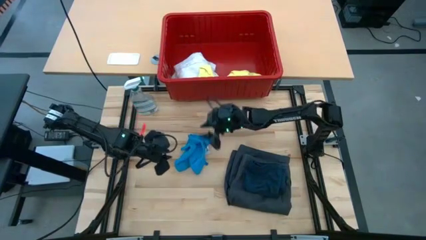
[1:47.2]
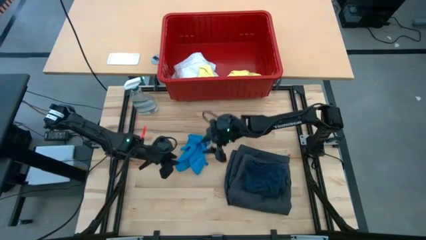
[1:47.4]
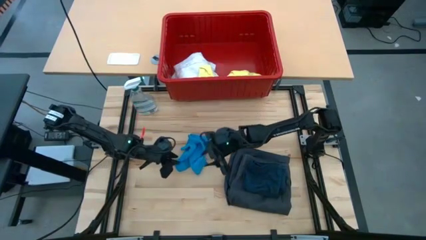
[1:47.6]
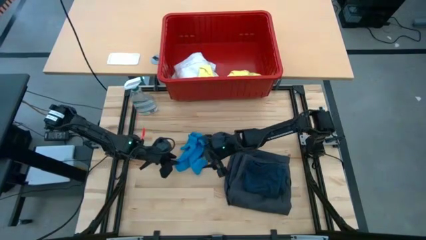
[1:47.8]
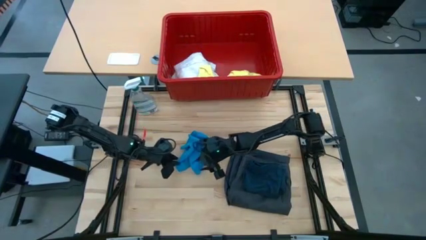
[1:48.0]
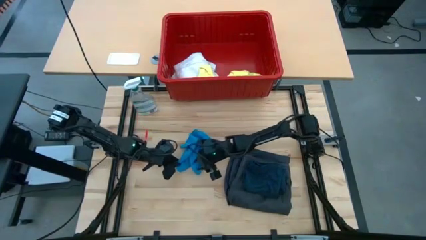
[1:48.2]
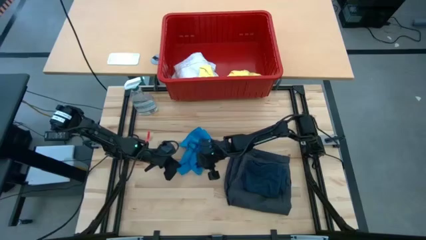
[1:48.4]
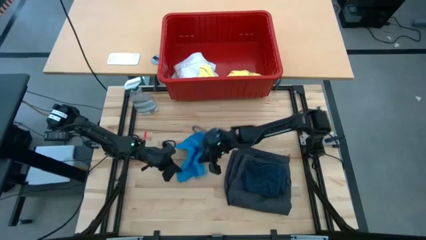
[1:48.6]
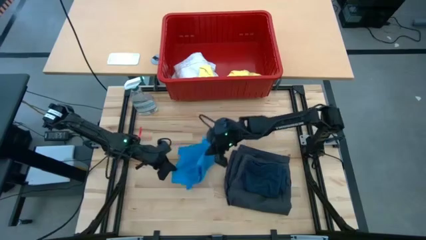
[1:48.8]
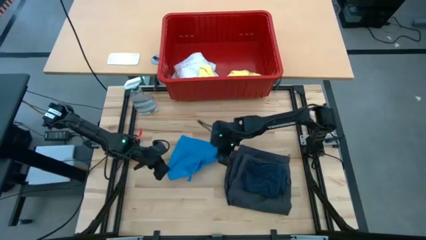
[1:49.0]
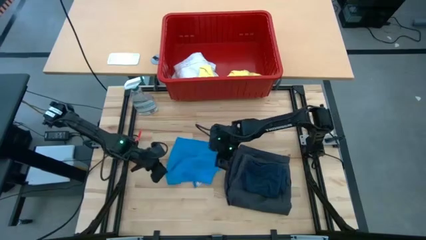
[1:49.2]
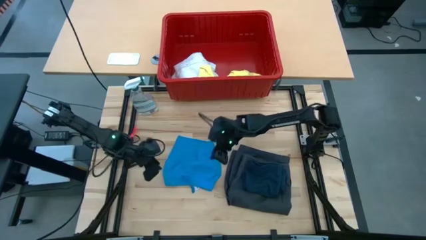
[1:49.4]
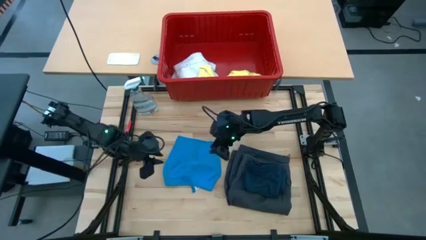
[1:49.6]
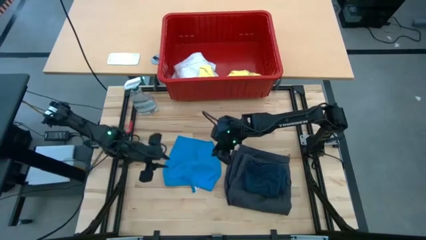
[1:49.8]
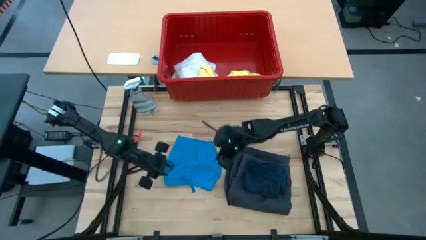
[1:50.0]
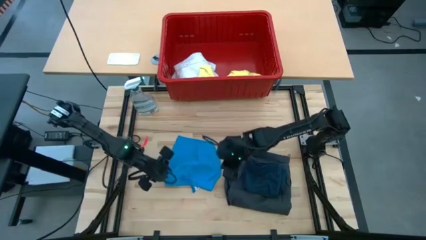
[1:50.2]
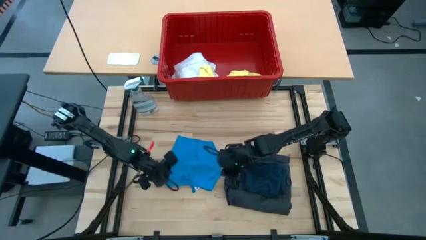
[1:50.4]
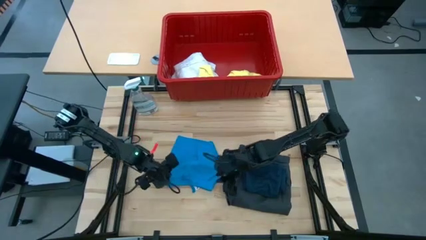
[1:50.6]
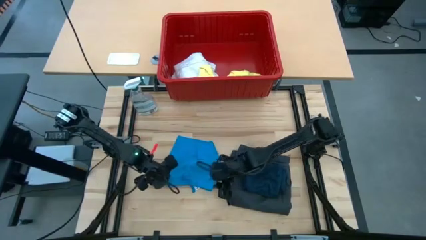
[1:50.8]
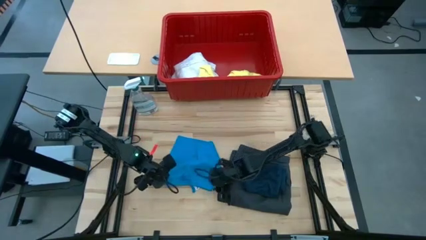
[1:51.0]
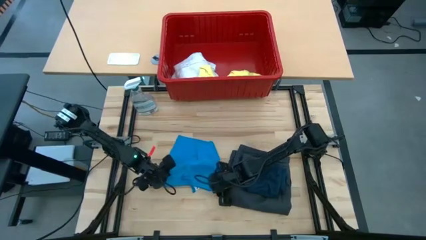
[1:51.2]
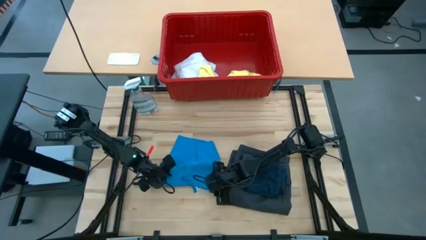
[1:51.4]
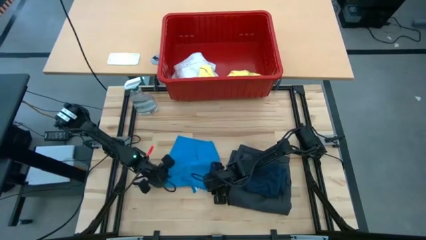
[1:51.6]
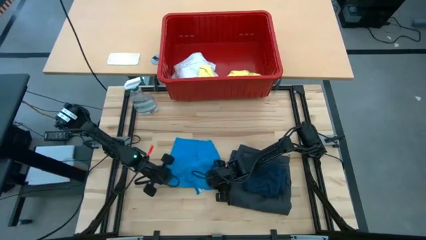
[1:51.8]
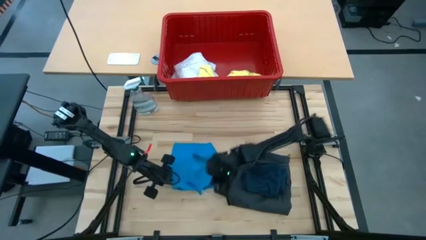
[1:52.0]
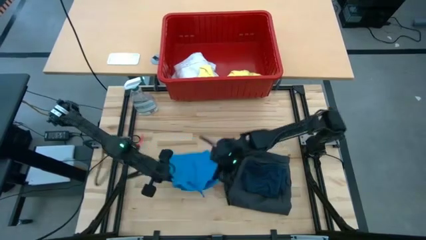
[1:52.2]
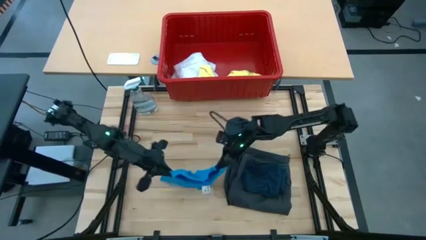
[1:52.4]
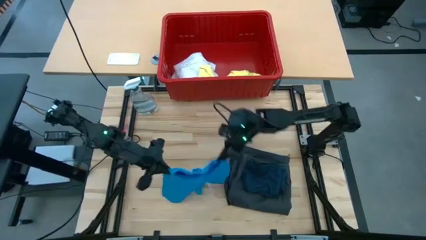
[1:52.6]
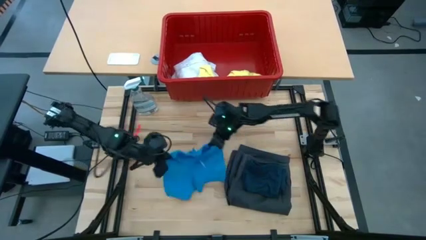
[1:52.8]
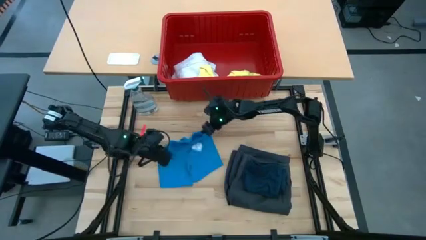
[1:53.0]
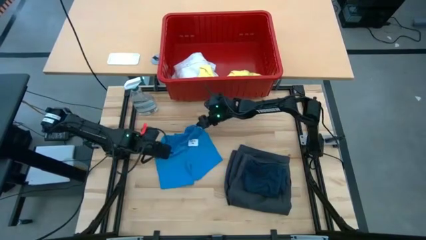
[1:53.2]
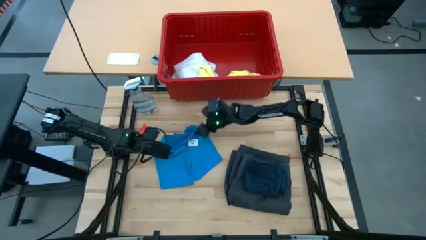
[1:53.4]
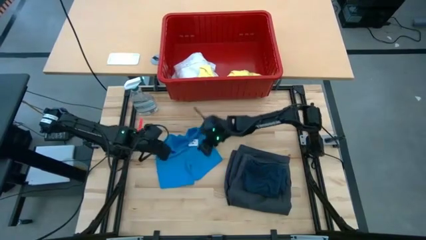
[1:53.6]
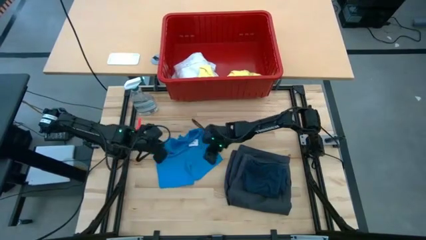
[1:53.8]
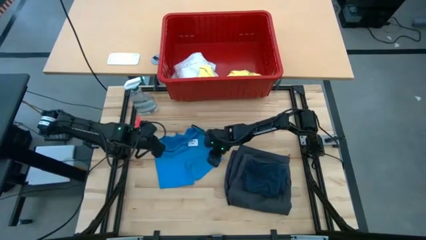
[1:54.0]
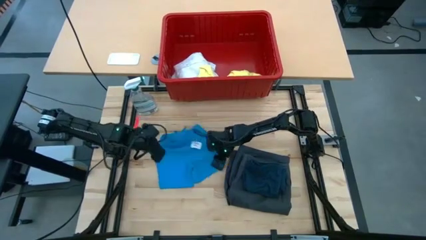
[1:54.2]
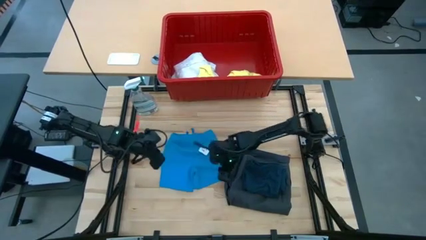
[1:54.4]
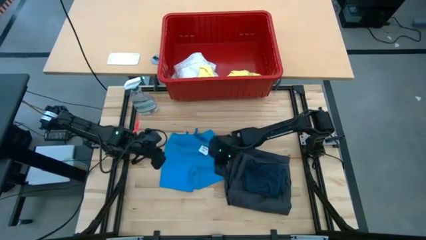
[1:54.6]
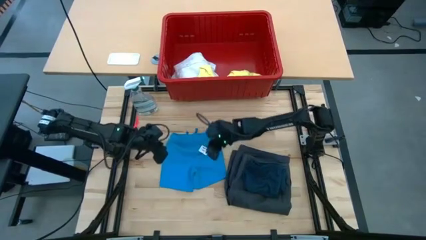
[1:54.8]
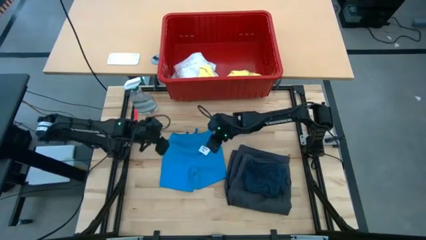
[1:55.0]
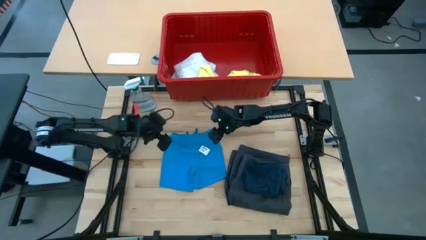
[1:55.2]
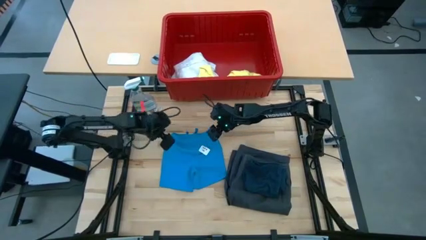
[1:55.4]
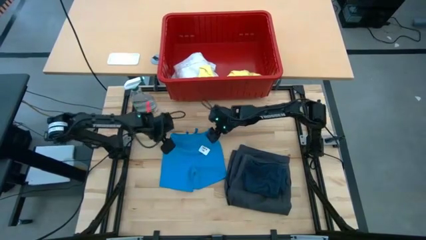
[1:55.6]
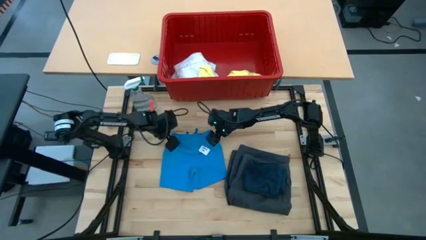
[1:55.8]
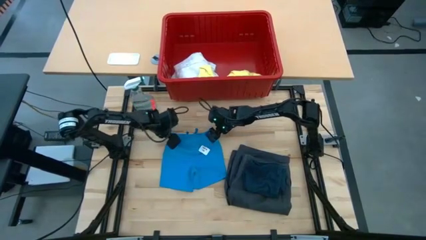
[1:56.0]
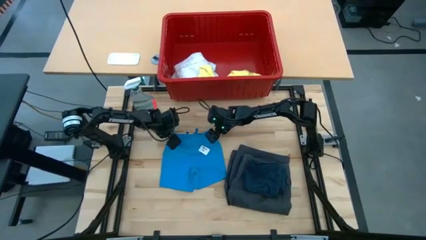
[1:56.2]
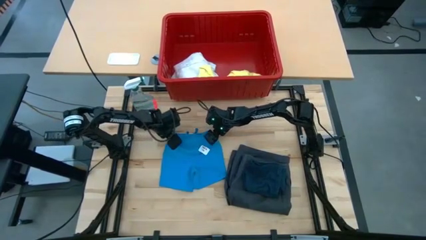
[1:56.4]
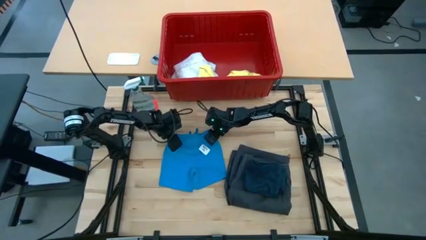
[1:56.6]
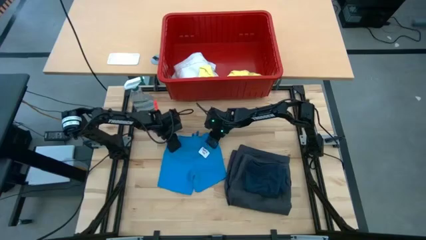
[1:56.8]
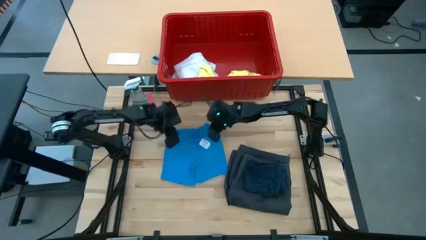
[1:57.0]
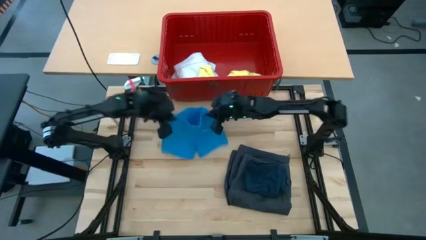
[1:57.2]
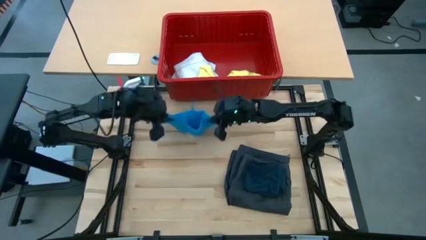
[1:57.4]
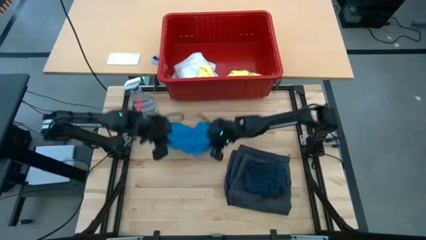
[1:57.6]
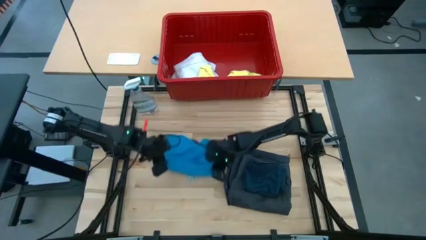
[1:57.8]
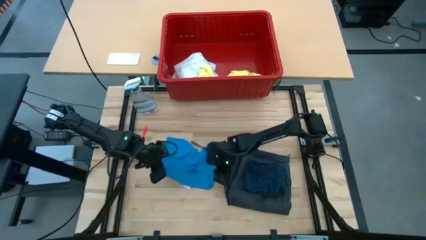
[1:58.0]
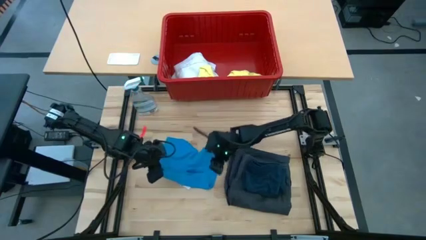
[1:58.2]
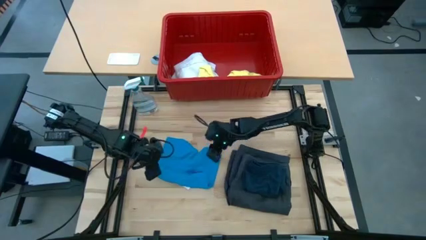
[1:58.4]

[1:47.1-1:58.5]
Task: Fold laundry
Fold the blue shorts
